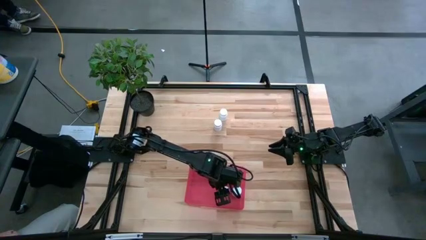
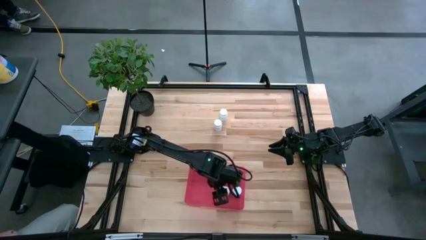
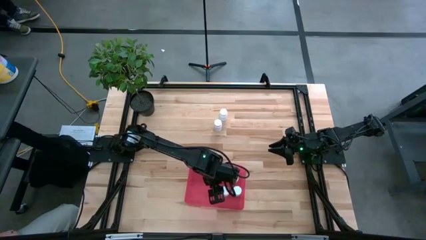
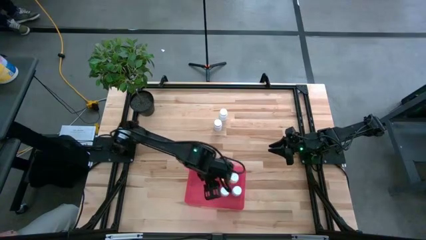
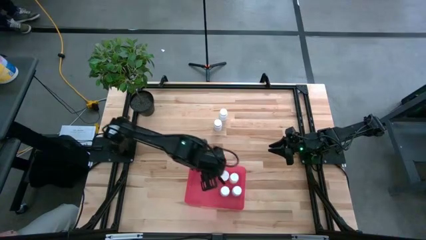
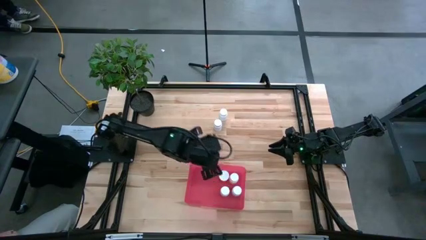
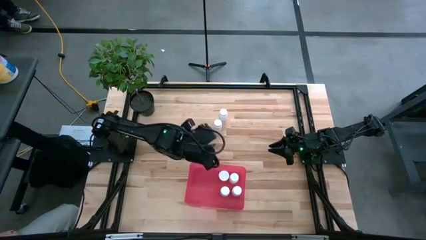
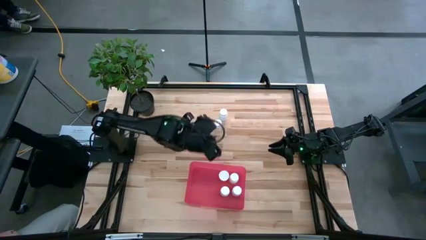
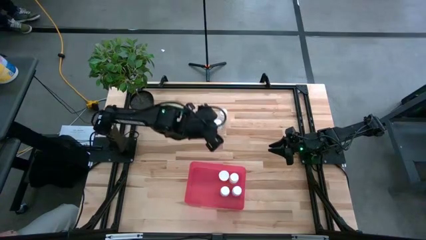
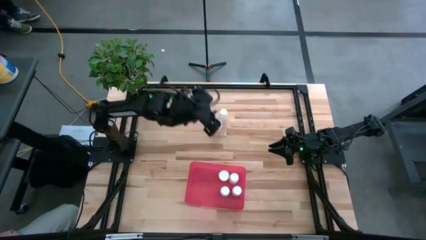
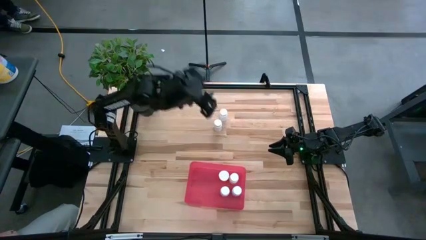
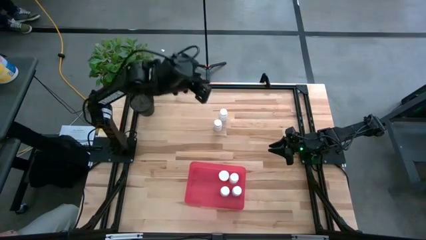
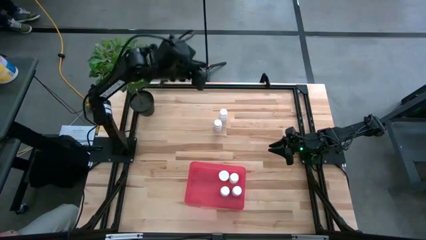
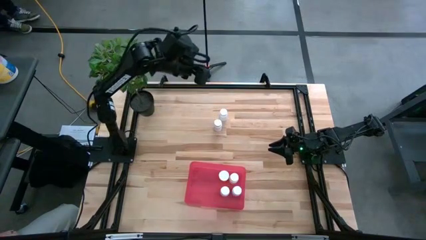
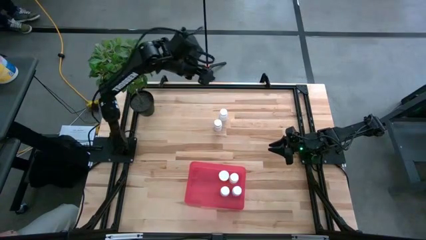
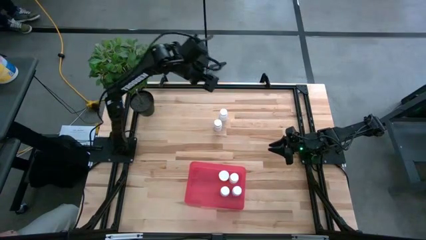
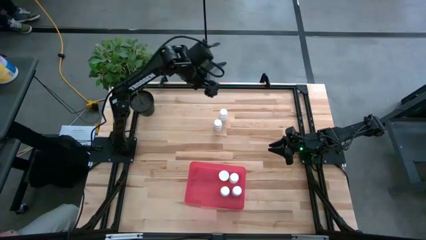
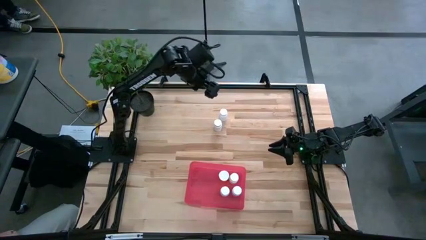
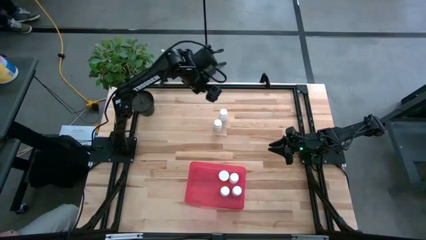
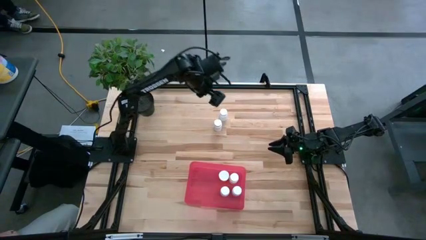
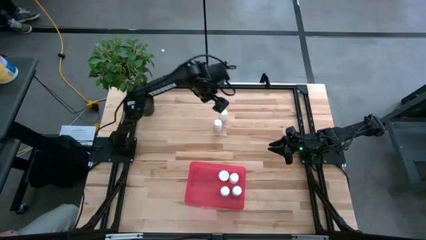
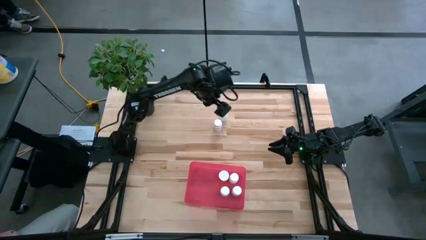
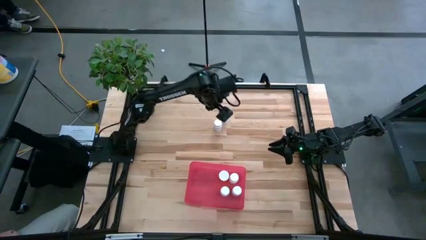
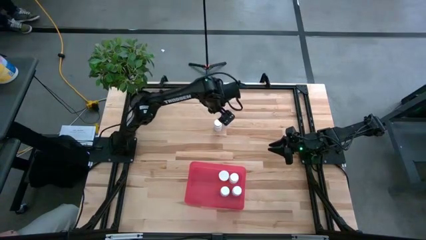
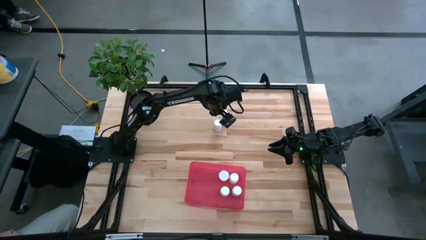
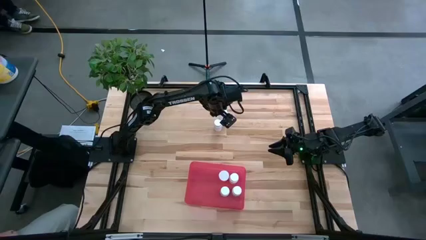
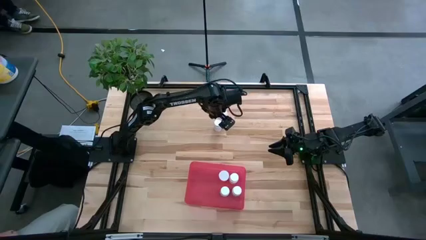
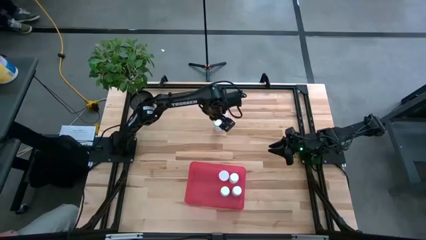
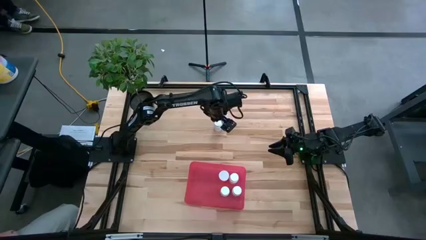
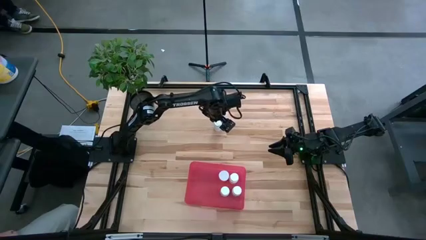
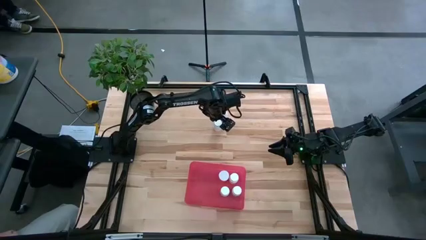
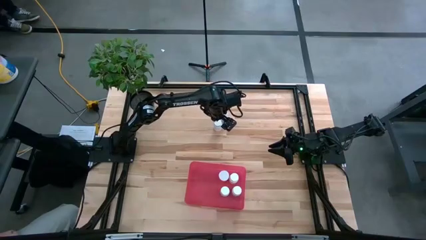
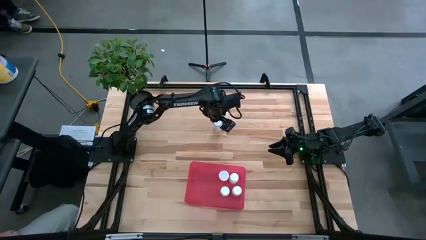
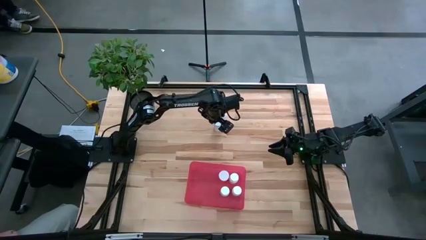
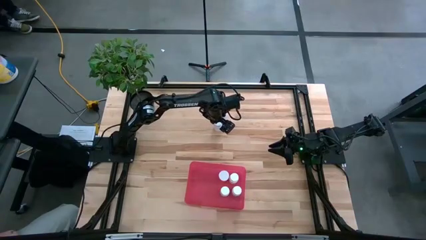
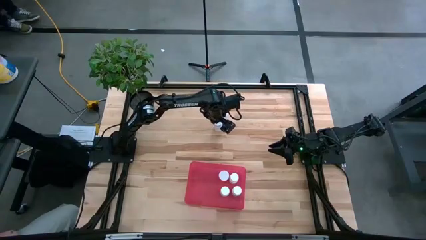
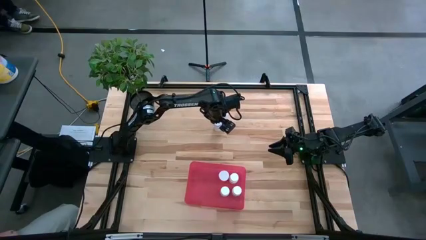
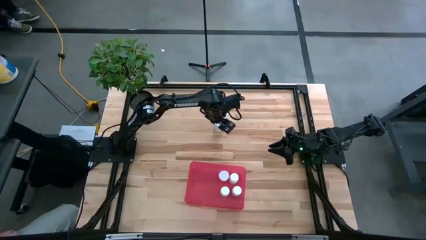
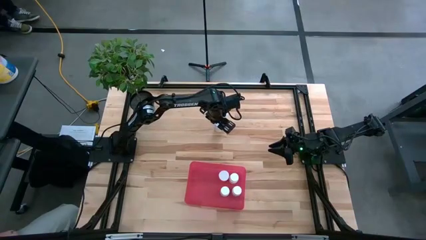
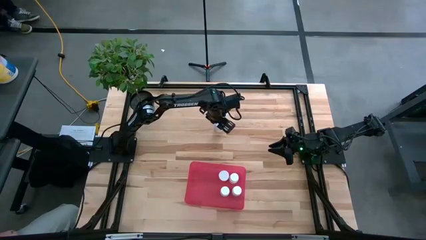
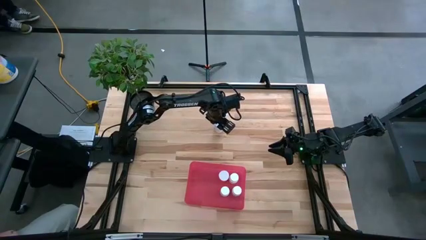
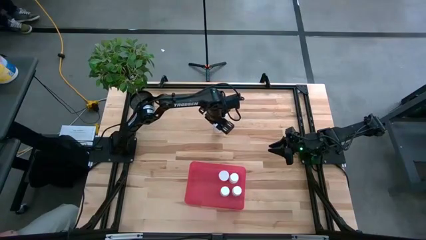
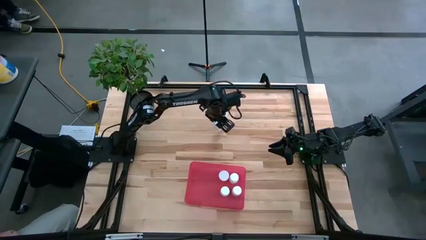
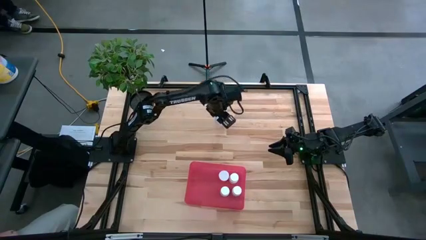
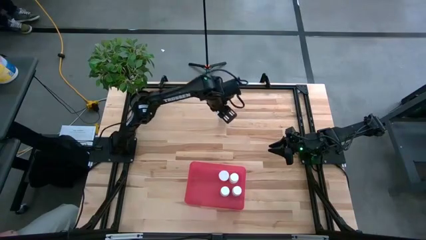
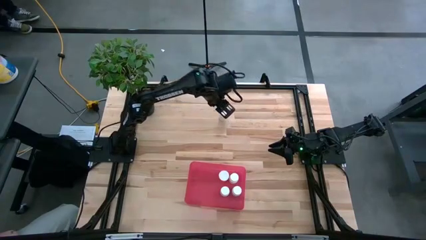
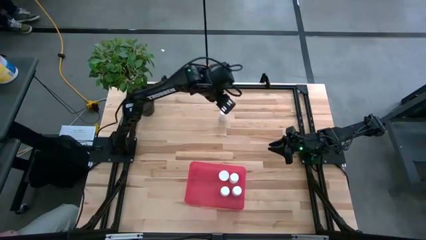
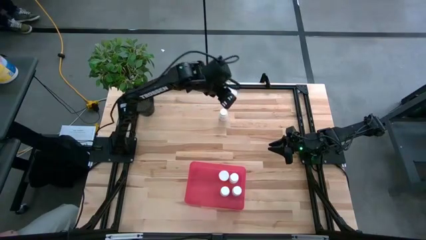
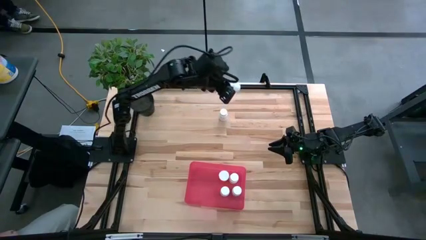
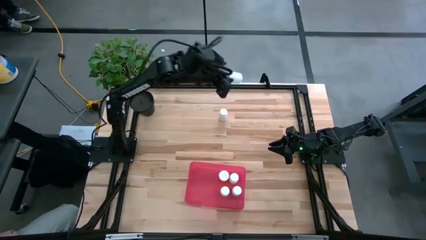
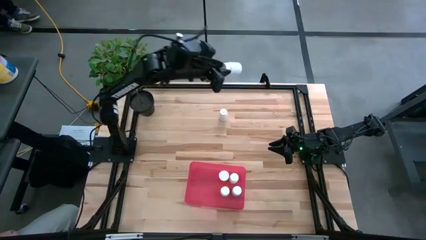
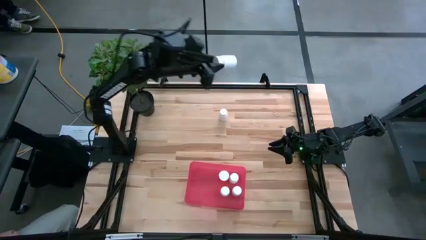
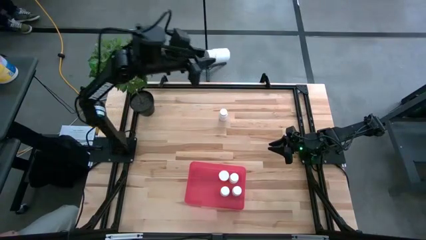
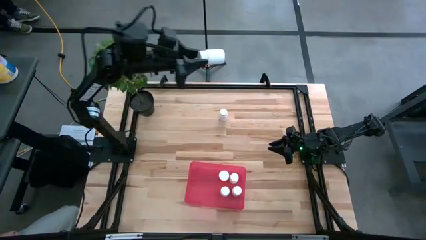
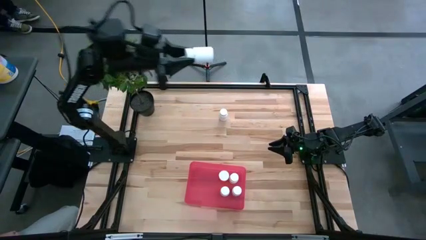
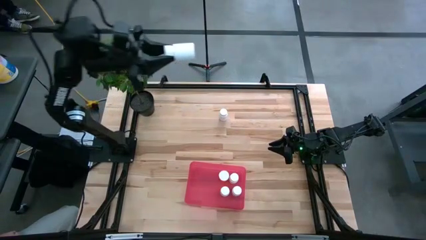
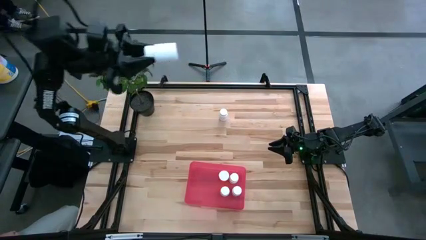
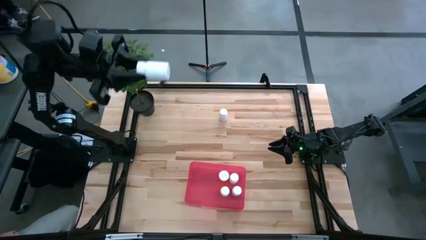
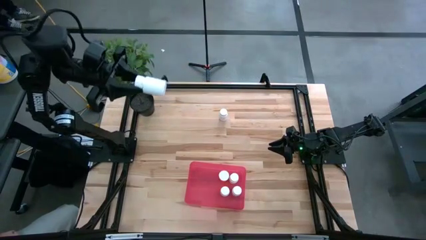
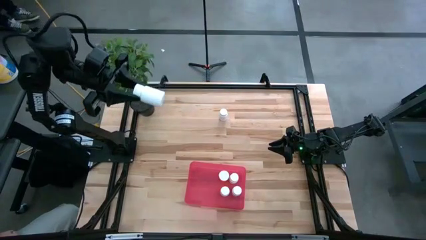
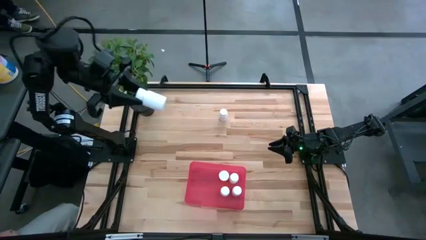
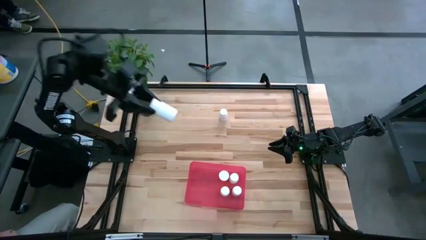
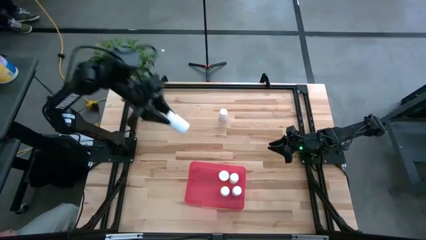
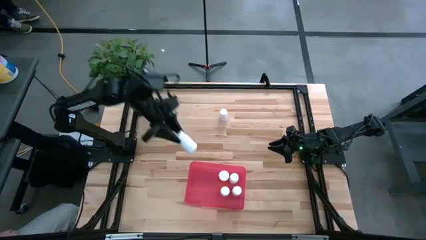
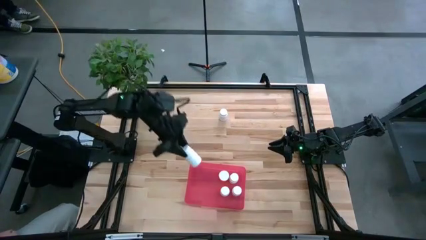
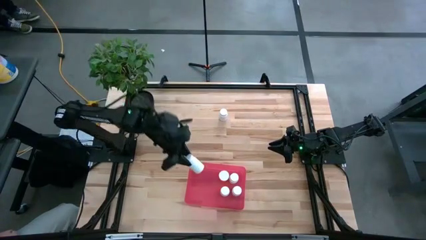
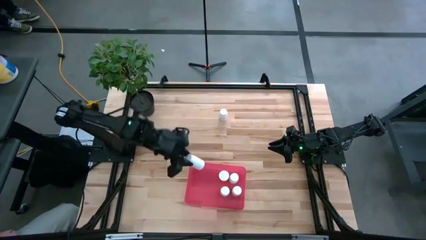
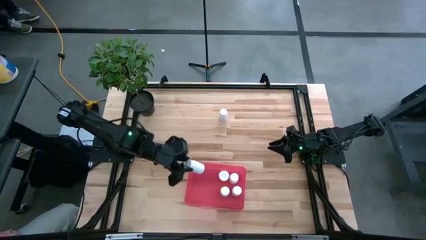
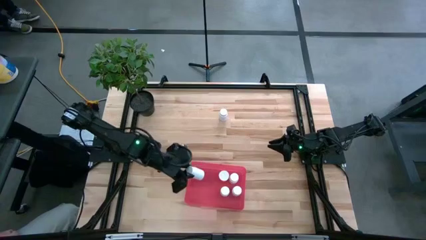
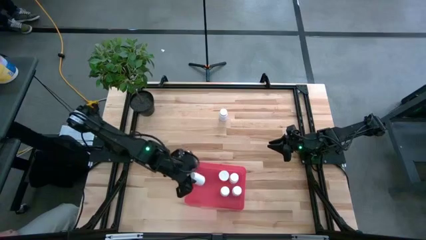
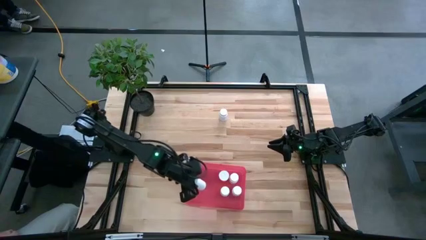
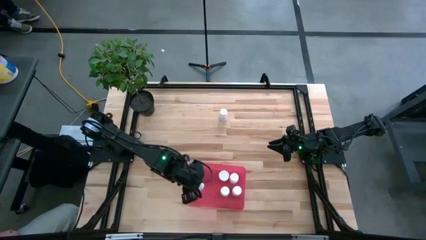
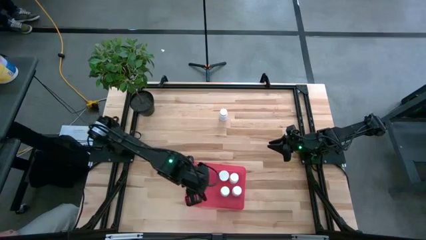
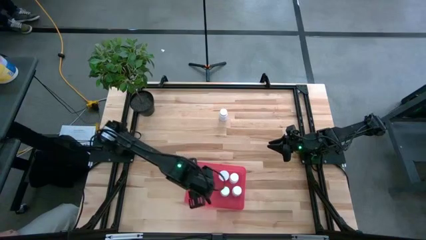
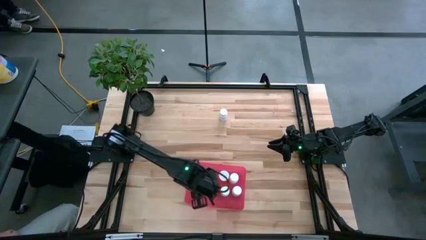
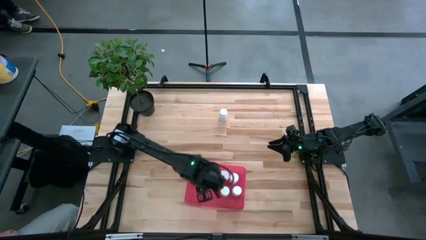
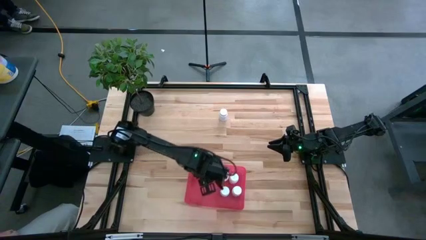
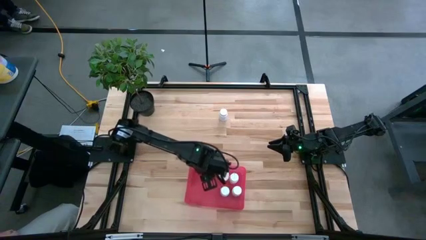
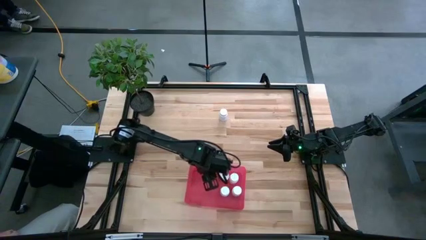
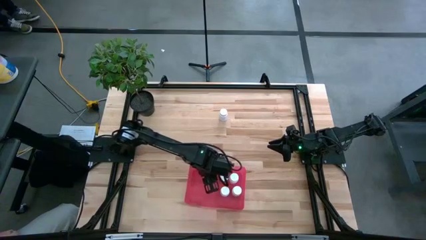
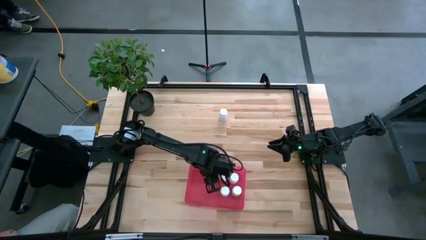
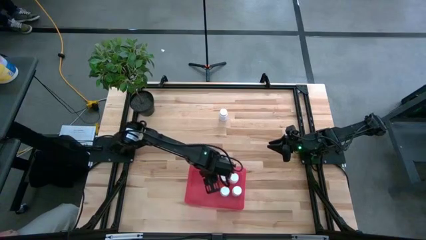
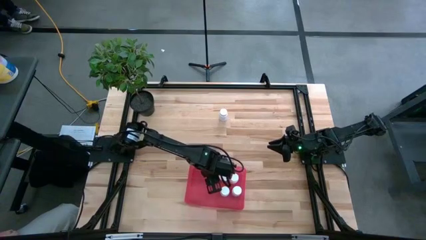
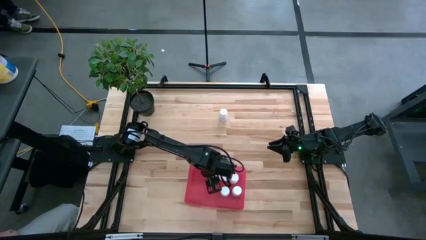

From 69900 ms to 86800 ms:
Task: Pick and place pill bottles into a basket
Put the white pill bottle into the red bin
